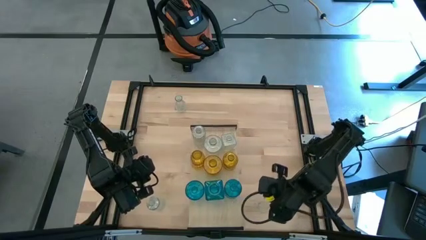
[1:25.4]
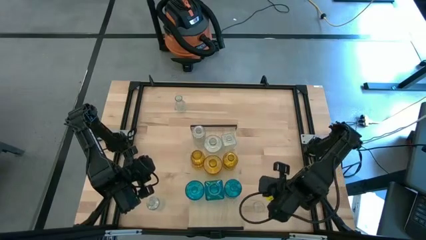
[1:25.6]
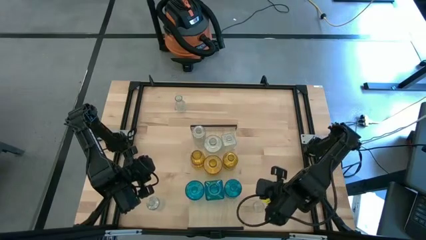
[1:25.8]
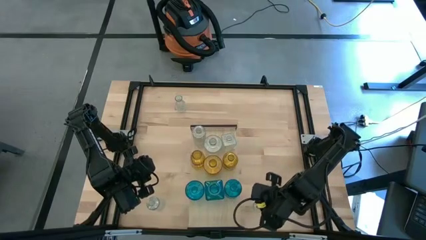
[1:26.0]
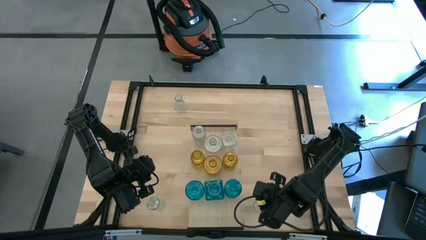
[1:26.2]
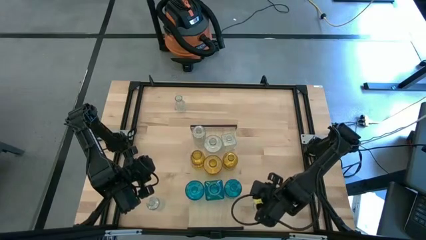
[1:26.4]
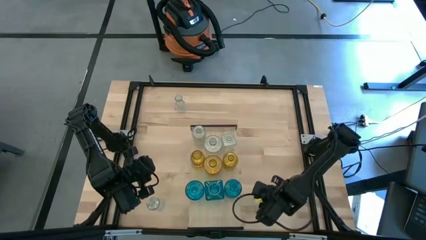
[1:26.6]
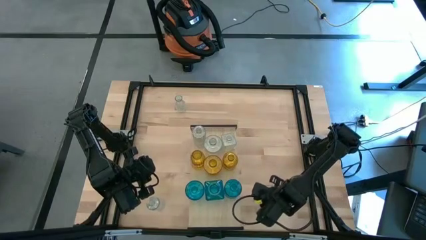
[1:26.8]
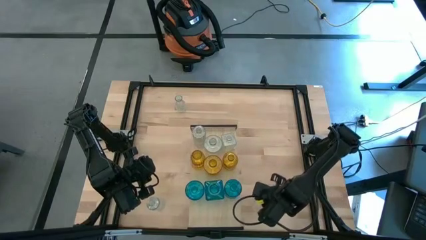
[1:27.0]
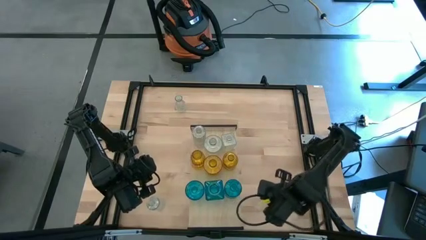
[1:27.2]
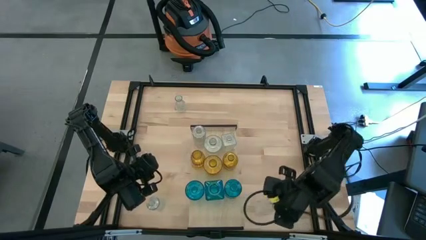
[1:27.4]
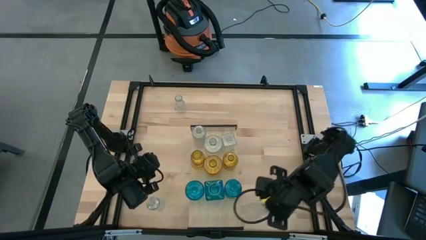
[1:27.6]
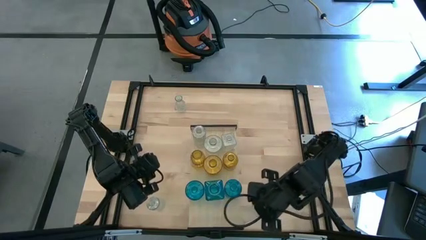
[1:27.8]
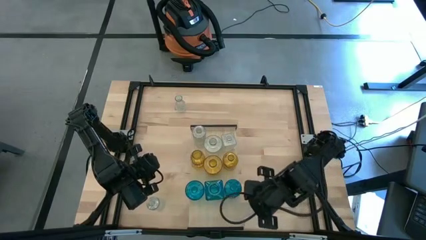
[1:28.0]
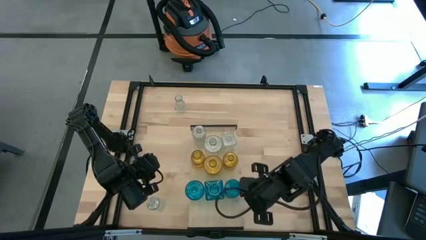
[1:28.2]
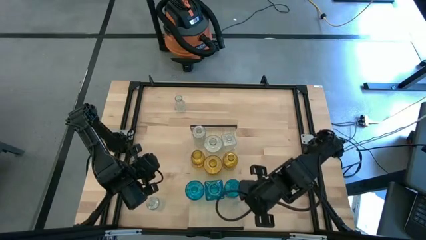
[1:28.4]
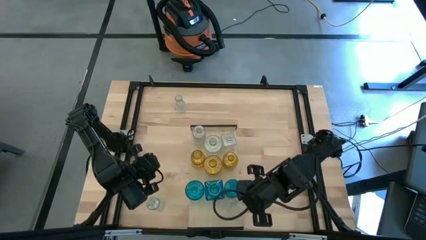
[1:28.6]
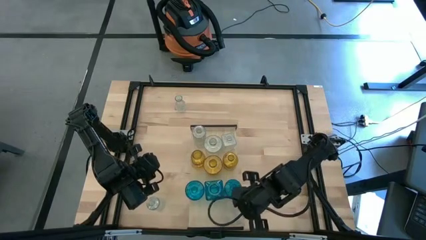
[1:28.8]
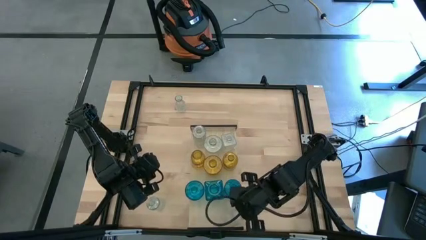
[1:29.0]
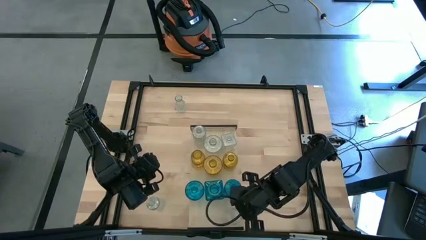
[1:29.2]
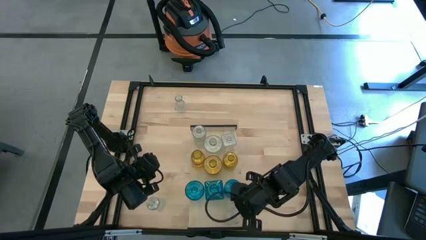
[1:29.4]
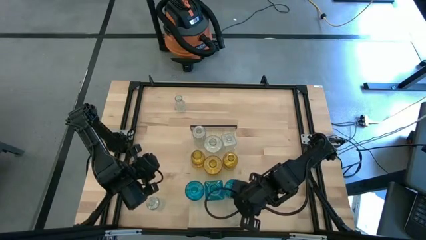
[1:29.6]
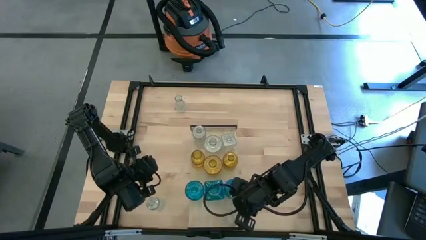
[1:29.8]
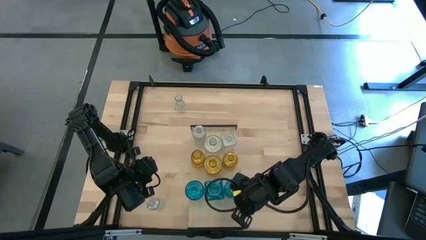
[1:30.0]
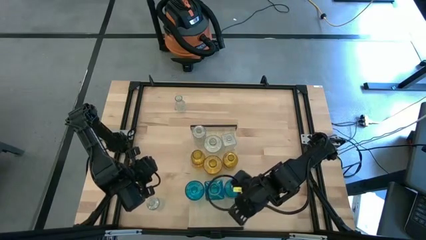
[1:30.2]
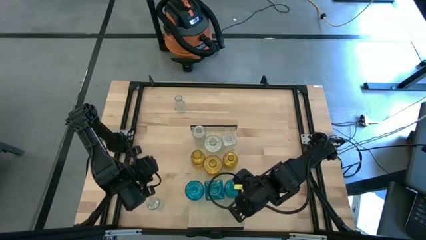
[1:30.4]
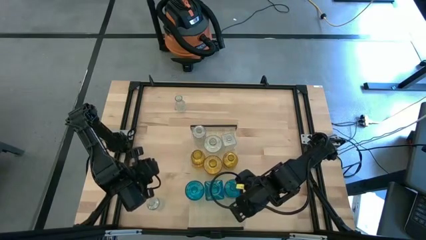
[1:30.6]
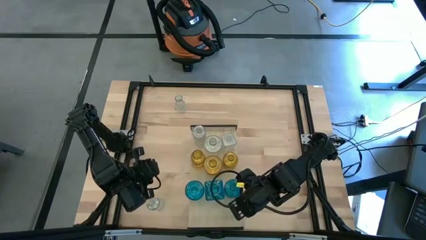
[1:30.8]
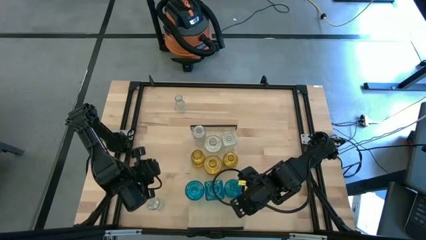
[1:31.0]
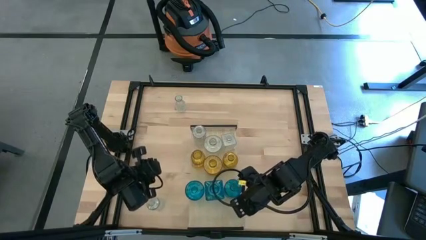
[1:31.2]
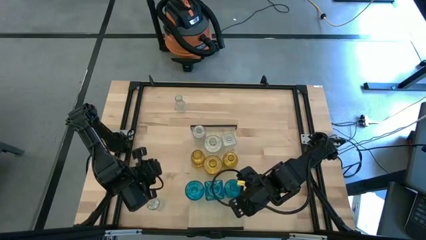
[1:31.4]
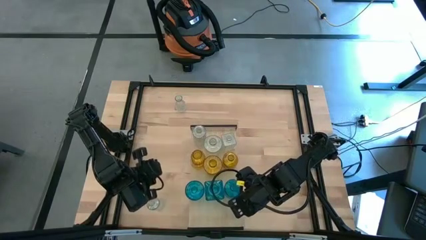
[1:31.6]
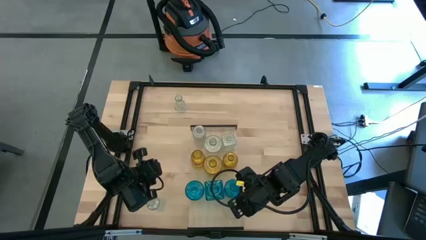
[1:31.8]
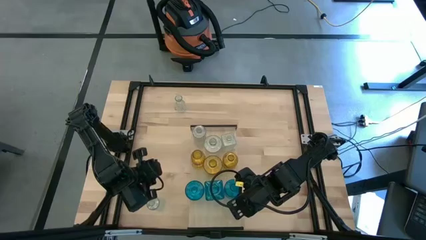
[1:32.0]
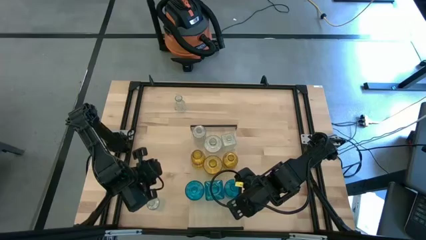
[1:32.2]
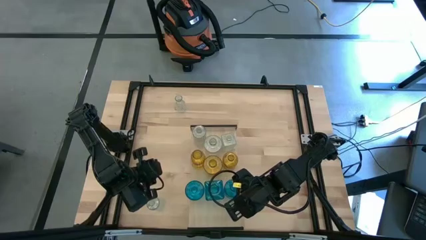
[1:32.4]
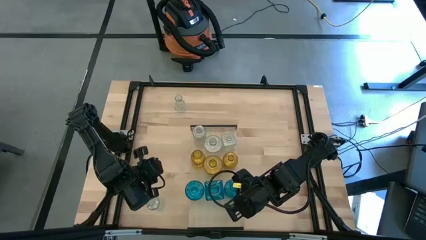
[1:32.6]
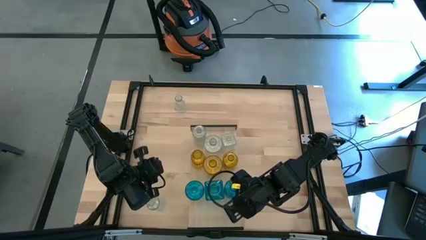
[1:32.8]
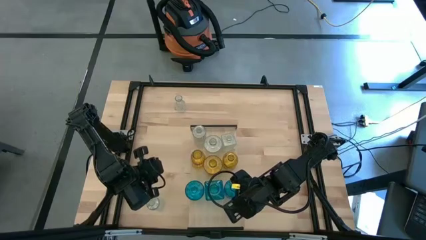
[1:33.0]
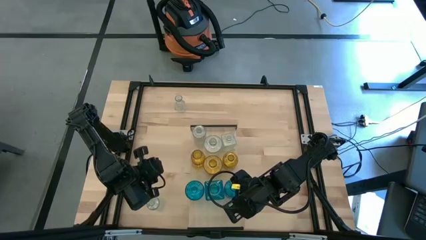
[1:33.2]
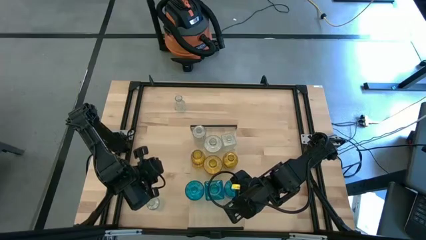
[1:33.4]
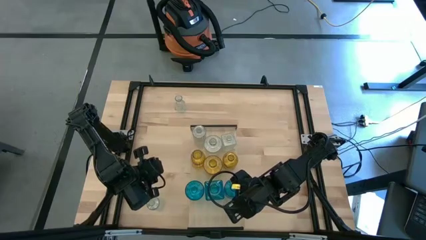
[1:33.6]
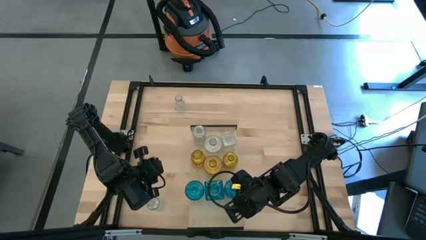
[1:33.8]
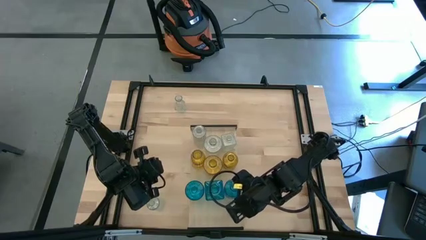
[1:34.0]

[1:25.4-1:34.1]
Task: sort vases onto shelf
Put the transparent vase on the shelf

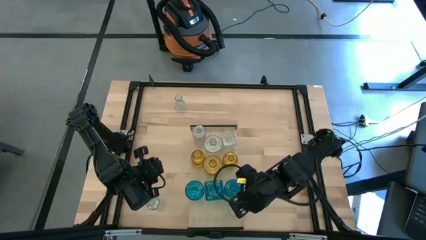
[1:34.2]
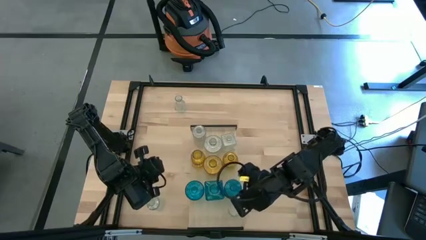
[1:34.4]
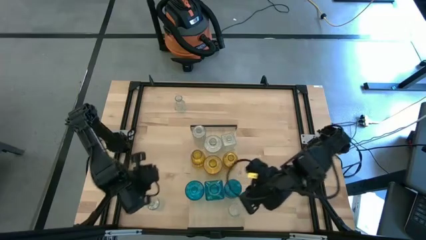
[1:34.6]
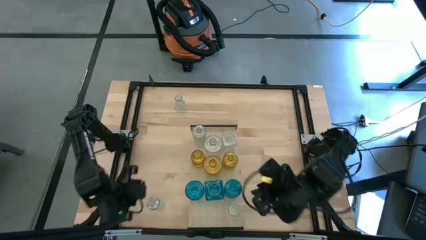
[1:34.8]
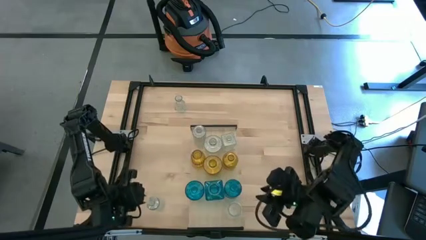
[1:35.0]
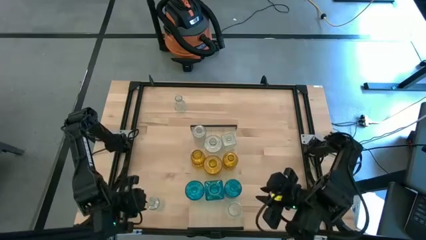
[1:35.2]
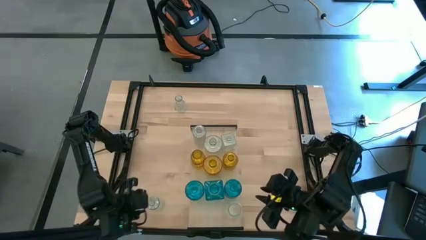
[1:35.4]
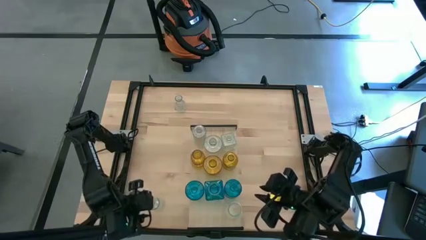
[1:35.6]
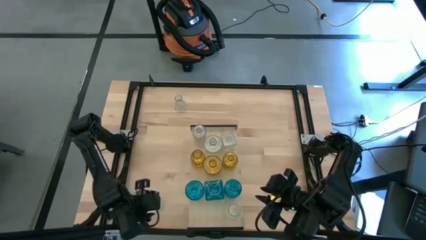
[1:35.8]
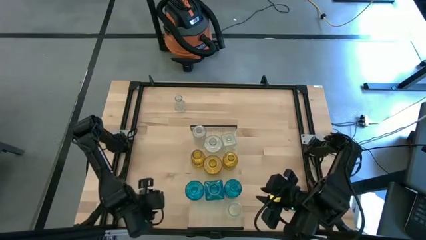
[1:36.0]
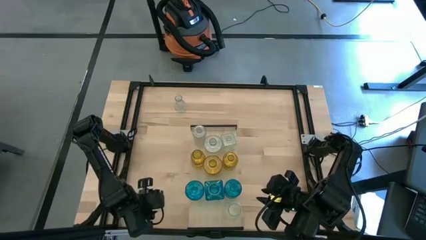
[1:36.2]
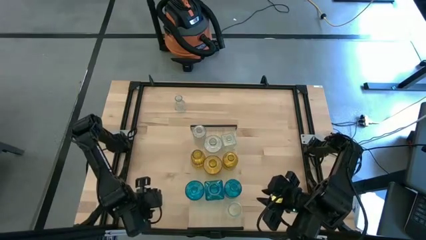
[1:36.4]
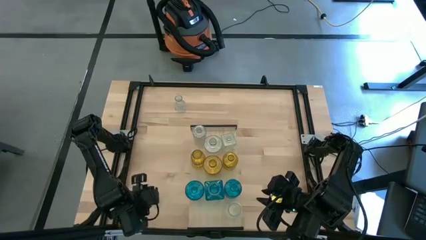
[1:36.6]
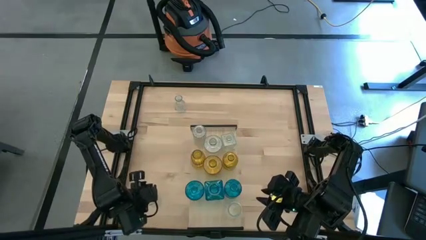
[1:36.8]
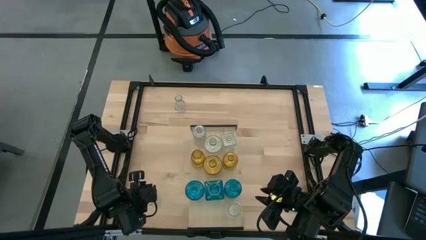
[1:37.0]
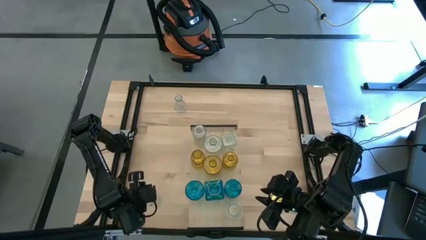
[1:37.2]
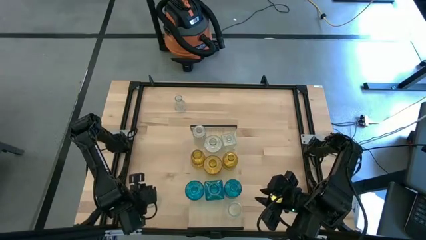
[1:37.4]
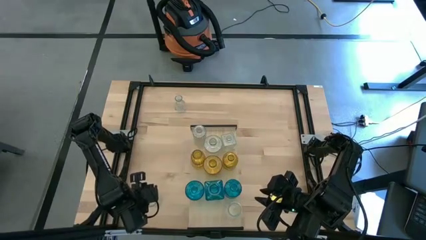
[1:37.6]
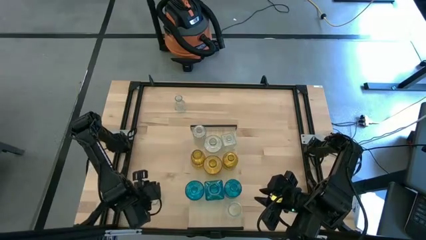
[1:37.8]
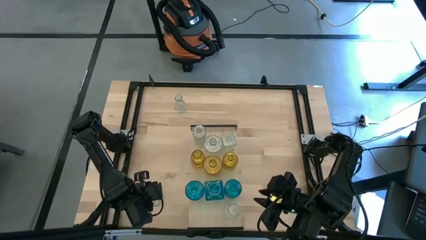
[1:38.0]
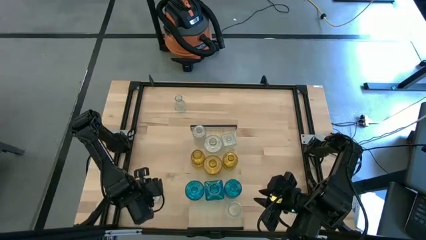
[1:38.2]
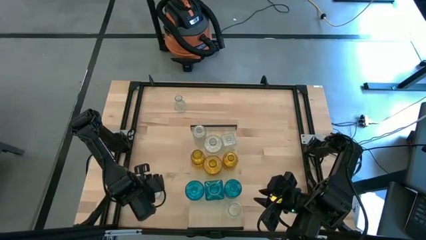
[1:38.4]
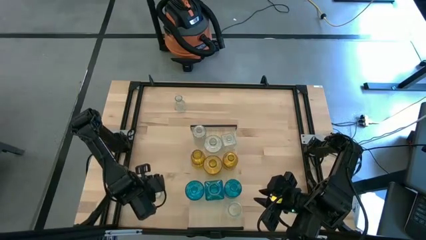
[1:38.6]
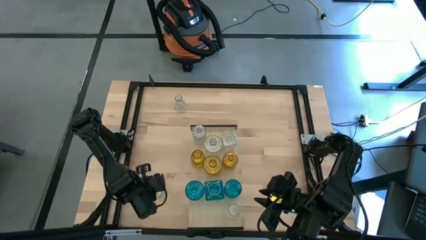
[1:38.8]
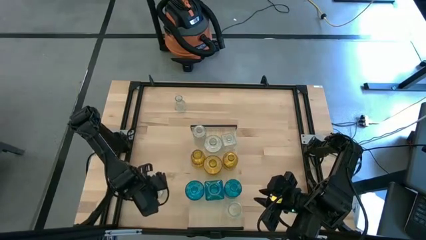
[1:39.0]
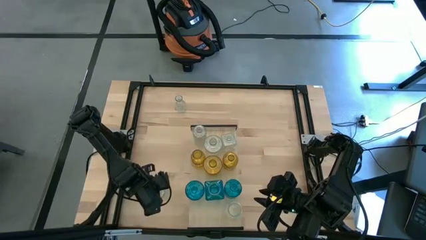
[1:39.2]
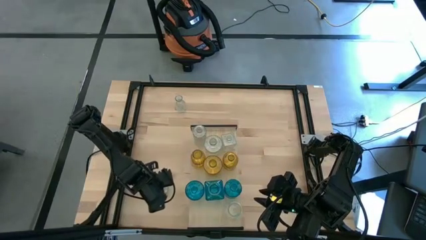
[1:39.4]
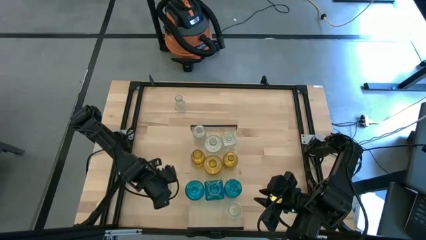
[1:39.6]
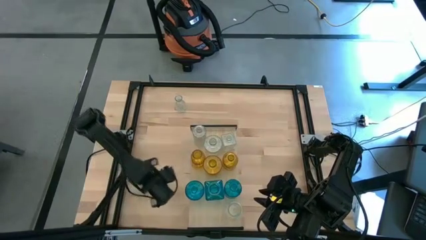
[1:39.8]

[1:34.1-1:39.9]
Put the transparent vase on the shelf aligned with the other transparent vase
